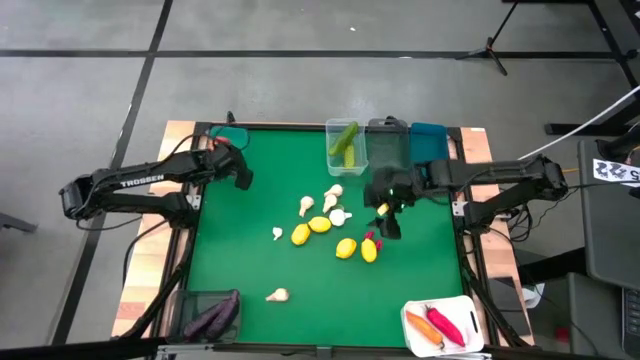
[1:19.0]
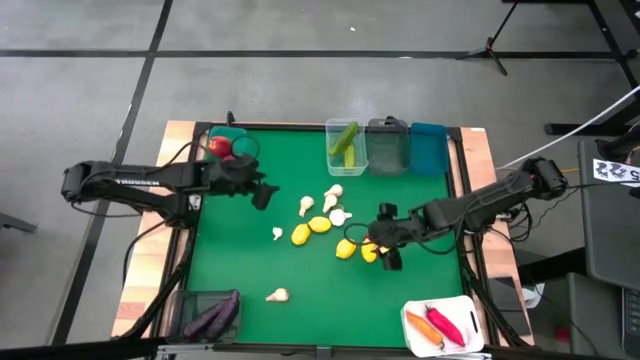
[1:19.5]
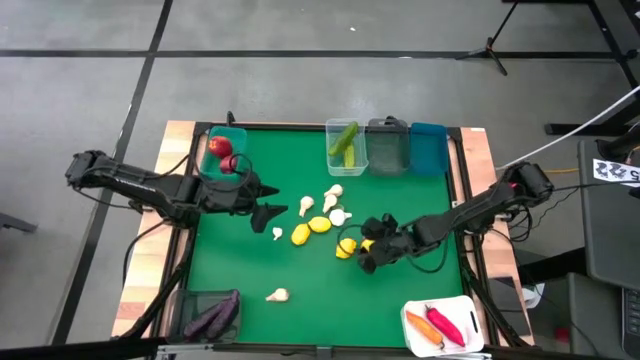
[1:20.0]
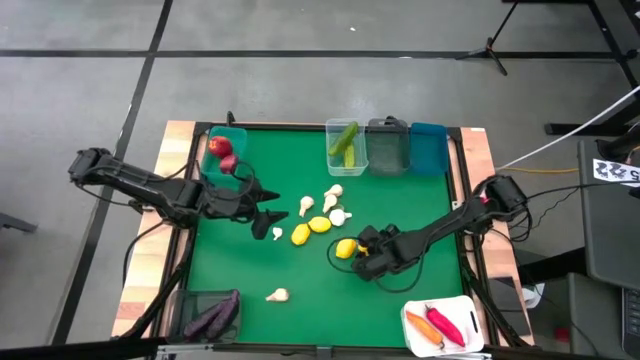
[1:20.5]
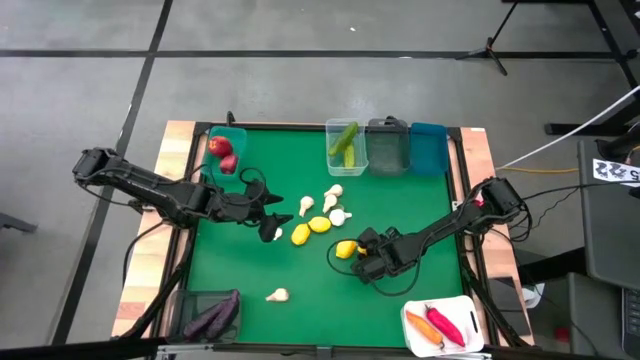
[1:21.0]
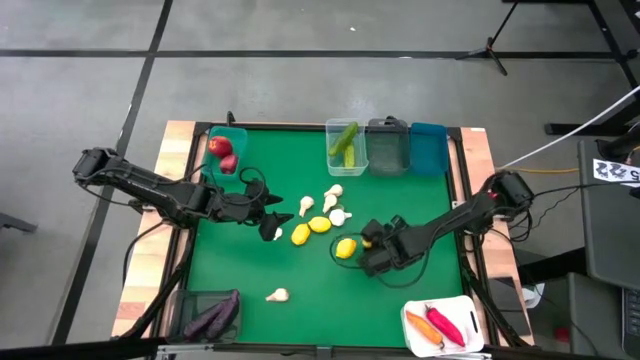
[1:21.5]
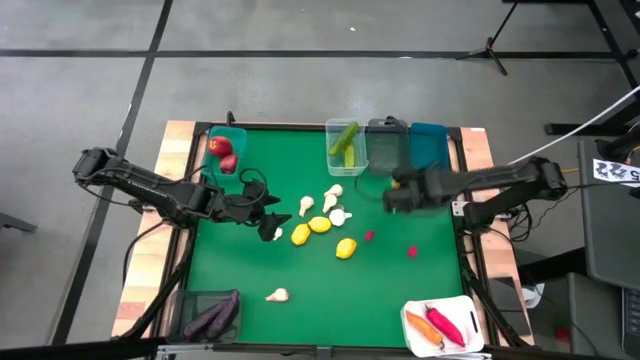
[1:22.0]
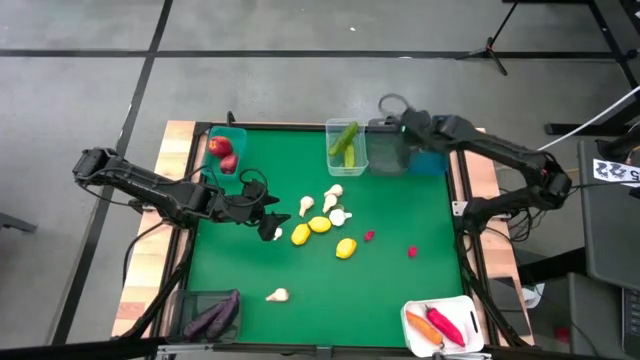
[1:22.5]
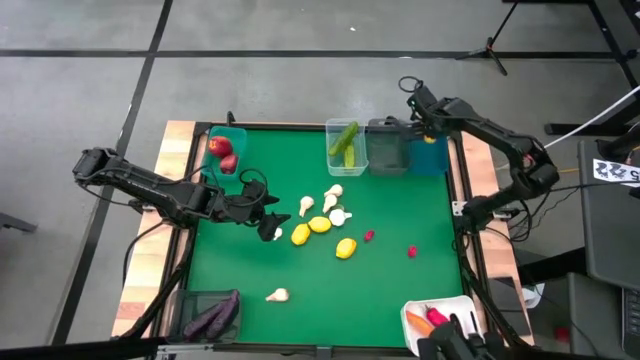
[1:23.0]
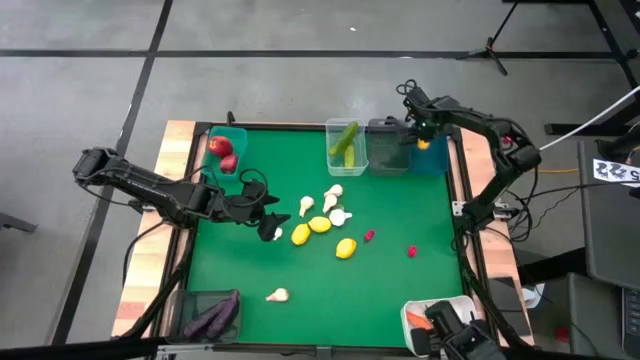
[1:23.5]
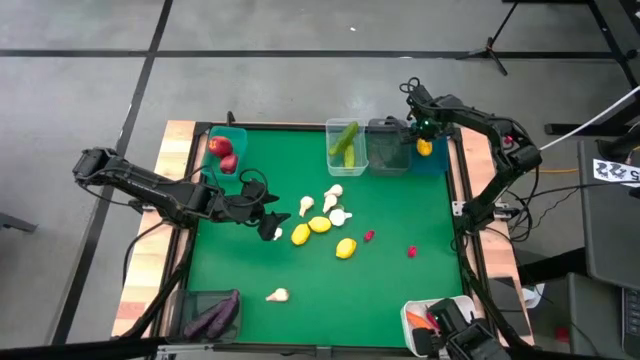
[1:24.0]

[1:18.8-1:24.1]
Task: Sort produce into baskets
Put the yellow lemon into the blue bin

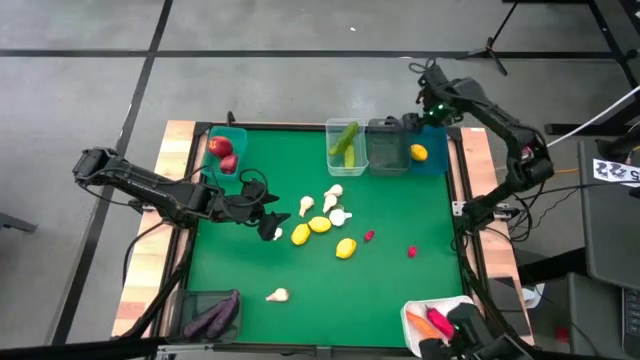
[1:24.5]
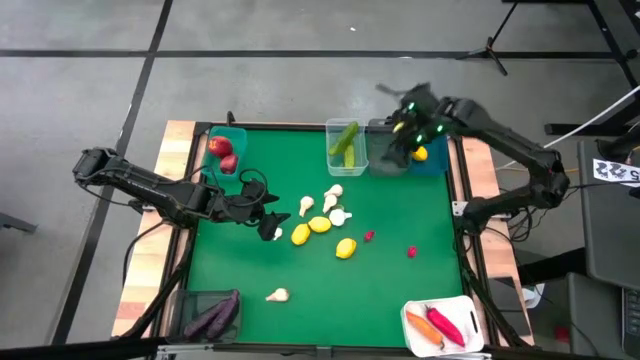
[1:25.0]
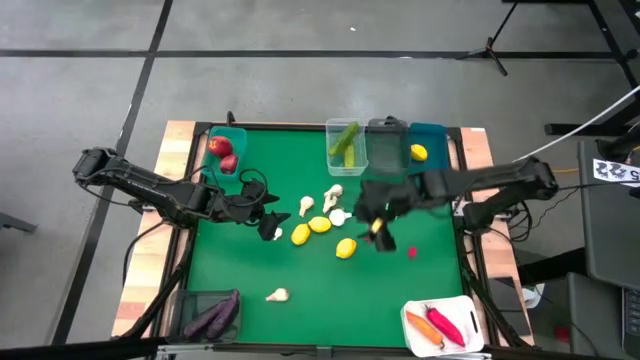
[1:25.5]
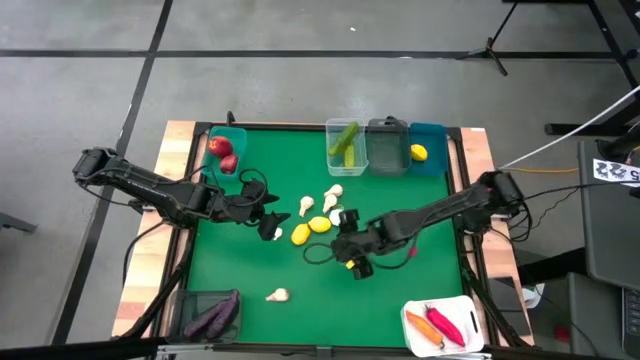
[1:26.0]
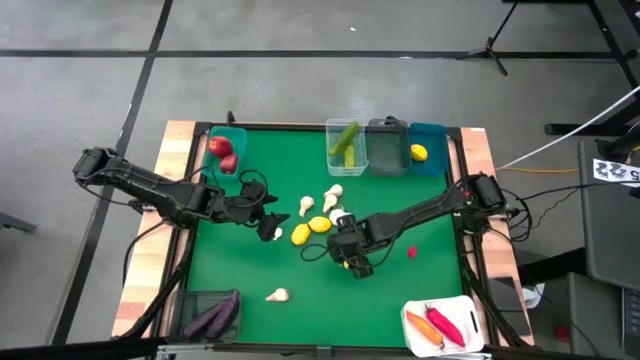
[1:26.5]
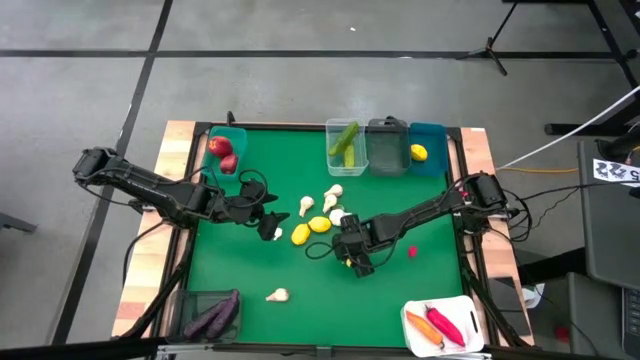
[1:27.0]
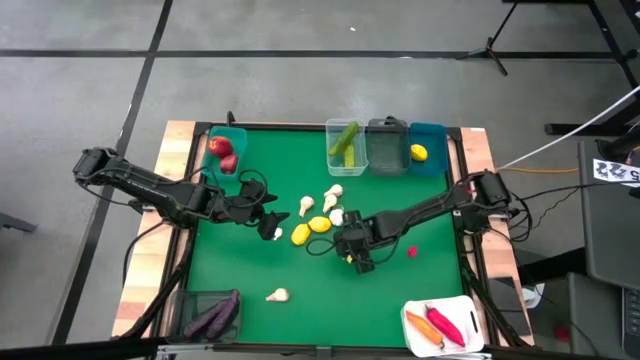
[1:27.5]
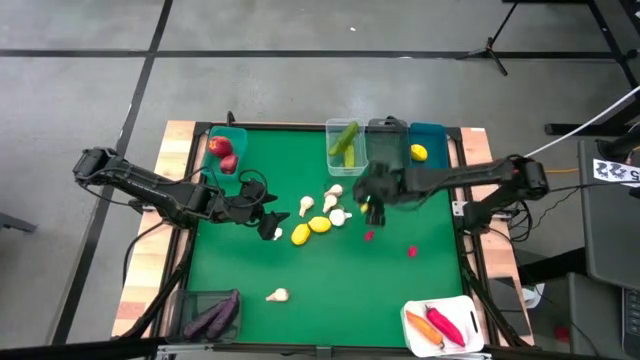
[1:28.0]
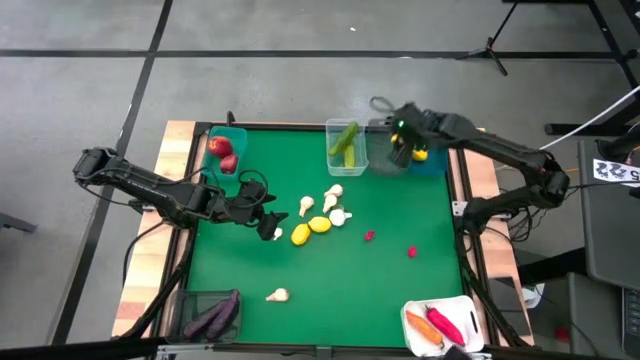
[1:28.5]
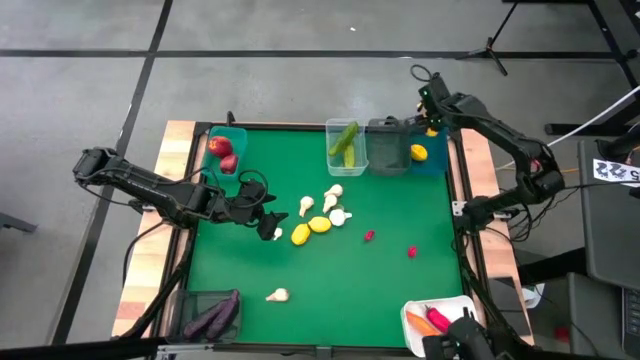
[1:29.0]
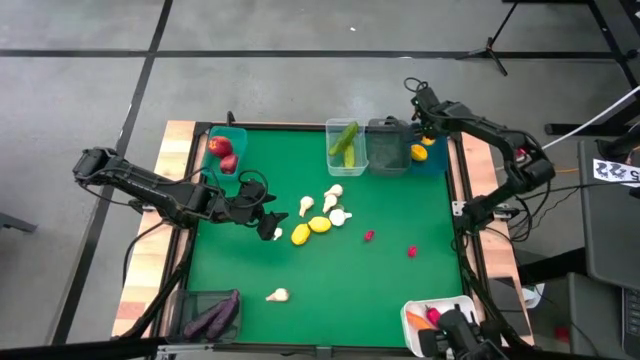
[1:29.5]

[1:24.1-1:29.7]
Put the yellow lemon into the blue bin

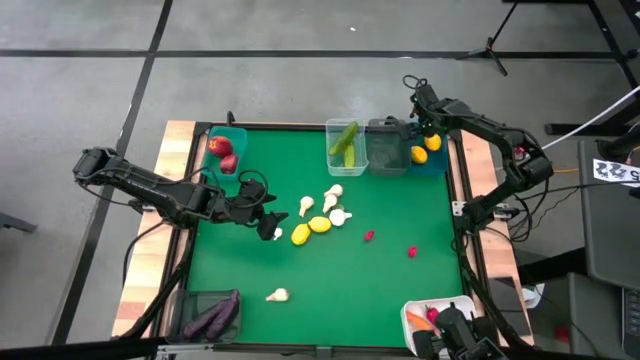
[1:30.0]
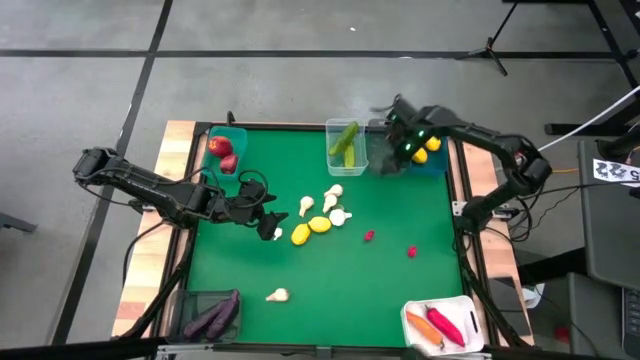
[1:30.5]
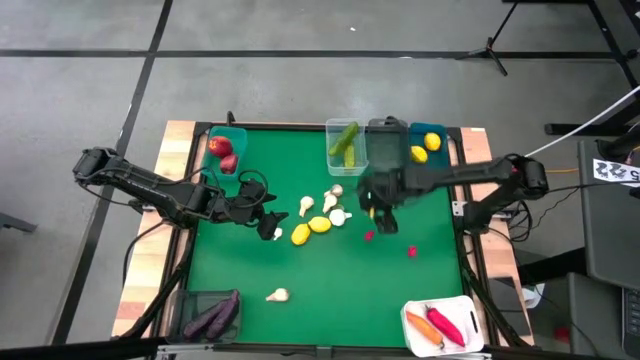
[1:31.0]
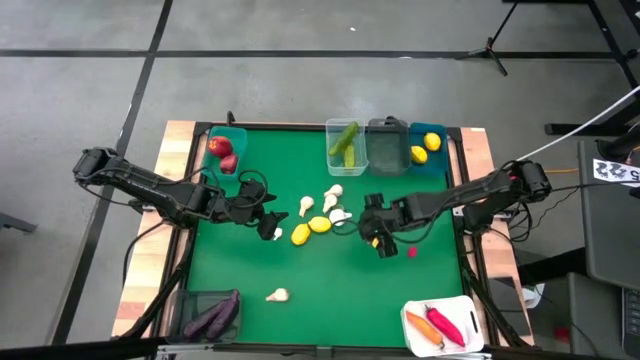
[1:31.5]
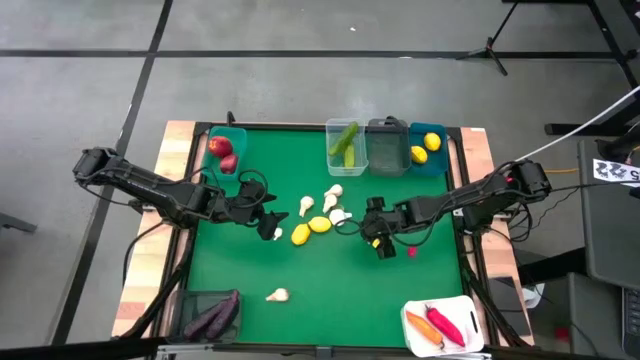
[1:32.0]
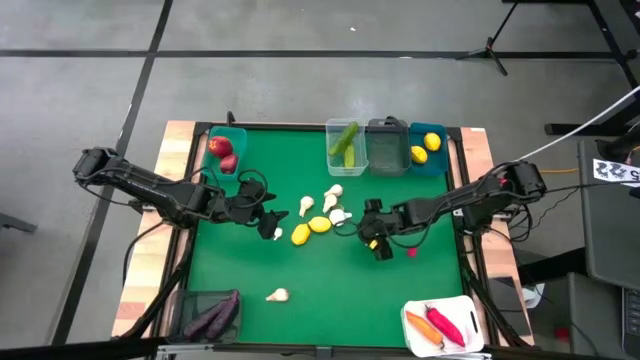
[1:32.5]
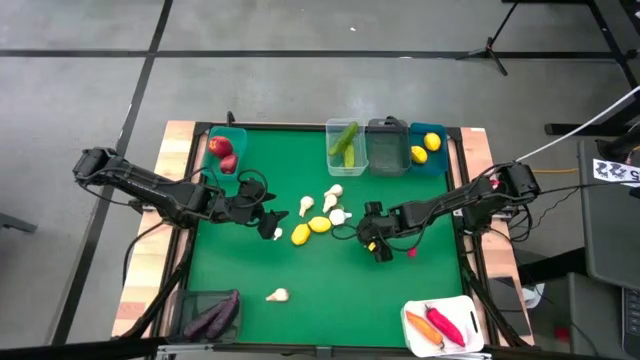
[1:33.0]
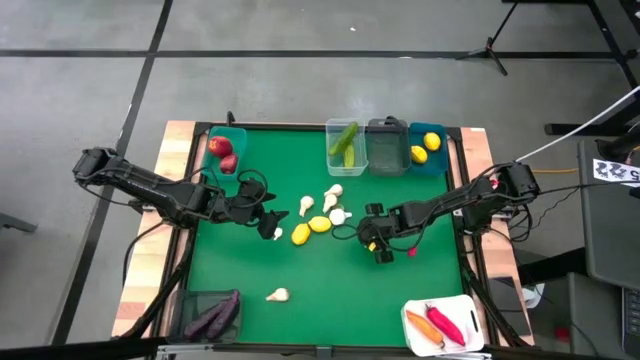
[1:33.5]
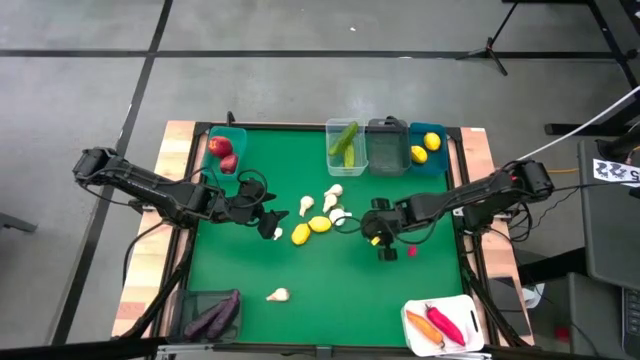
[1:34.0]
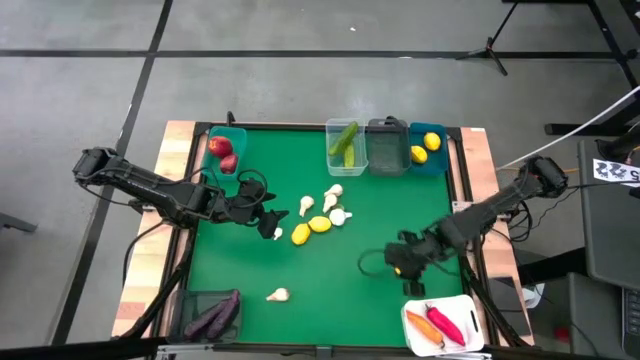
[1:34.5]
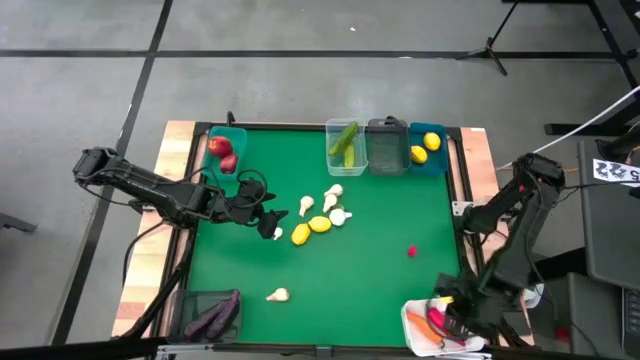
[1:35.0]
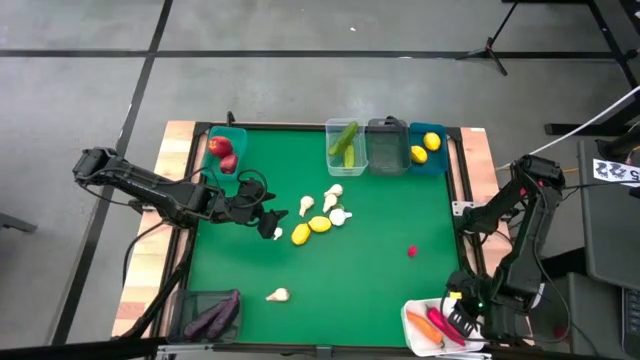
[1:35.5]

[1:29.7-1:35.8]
Put the red chili into the white bin

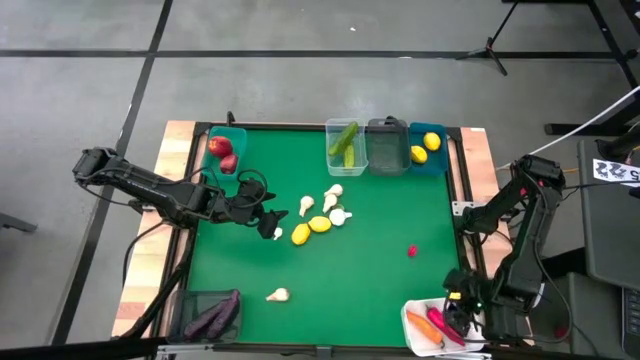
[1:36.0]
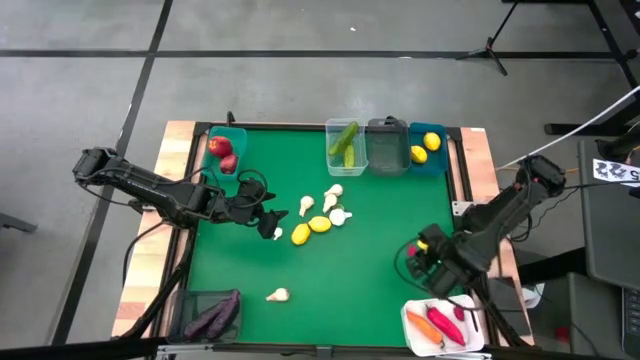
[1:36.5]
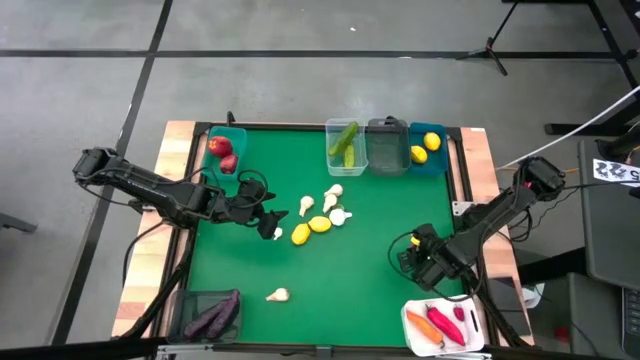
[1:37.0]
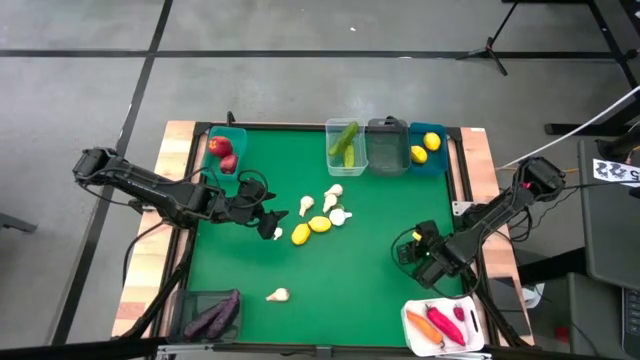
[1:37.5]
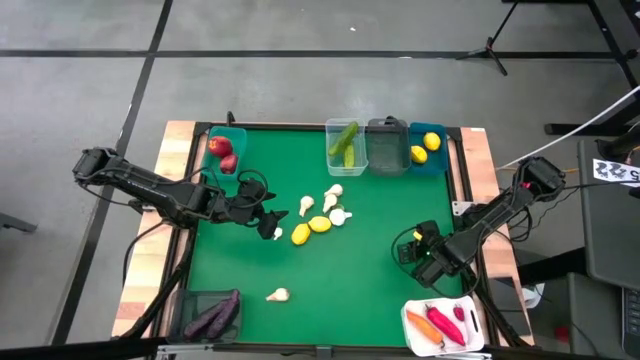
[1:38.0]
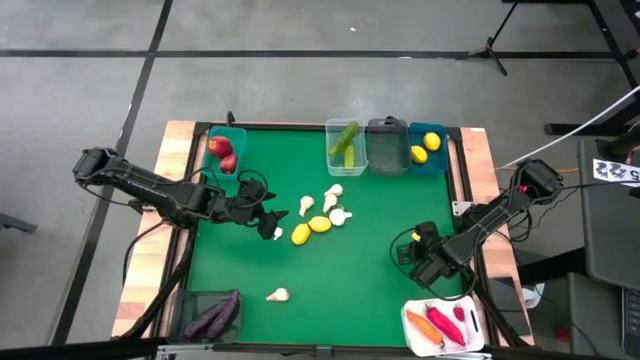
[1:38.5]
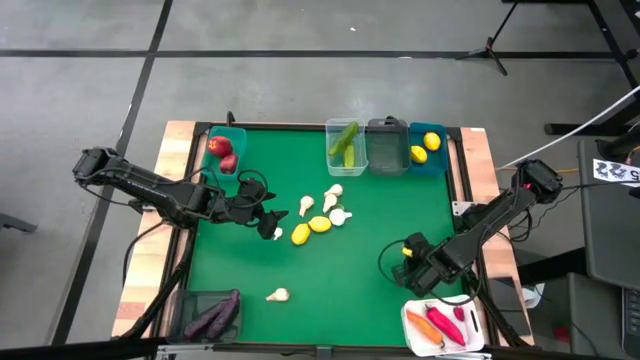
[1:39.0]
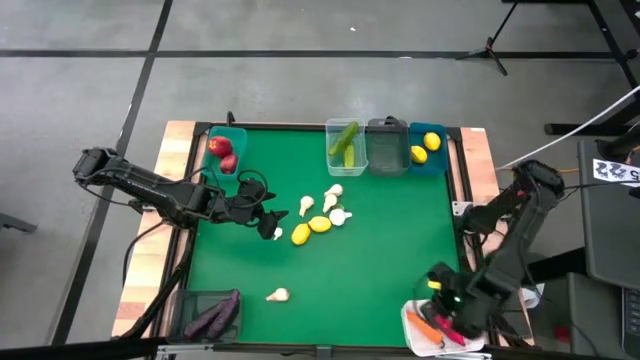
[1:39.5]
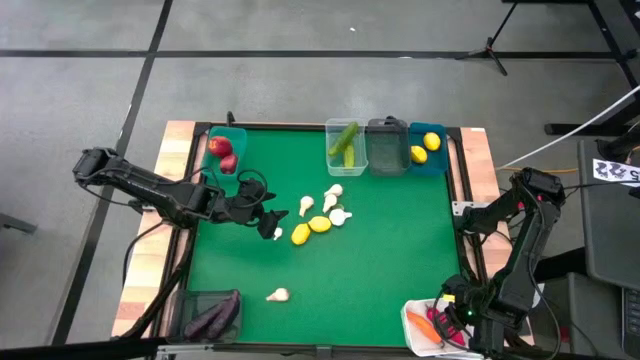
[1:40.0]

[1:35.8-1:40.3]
Put the red chili into the white bin
